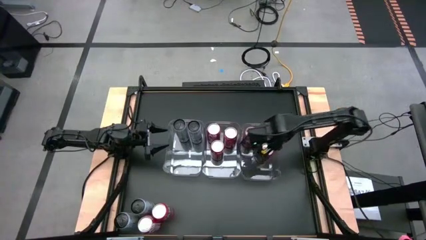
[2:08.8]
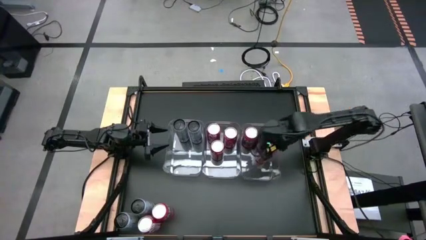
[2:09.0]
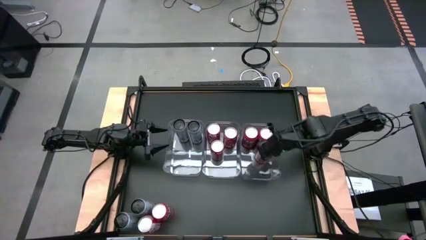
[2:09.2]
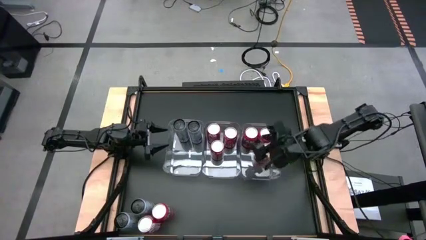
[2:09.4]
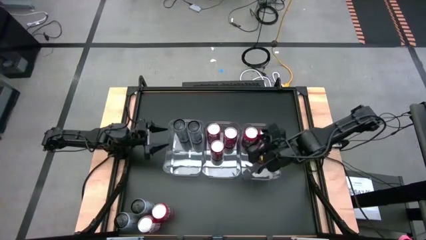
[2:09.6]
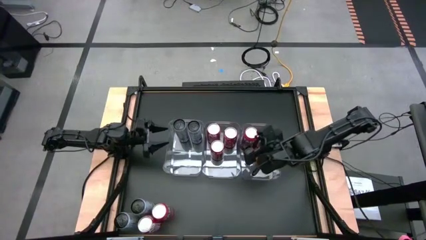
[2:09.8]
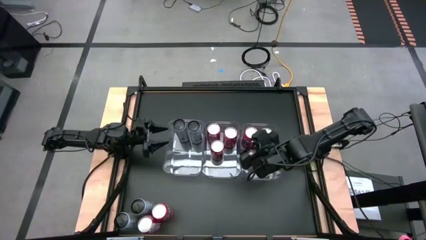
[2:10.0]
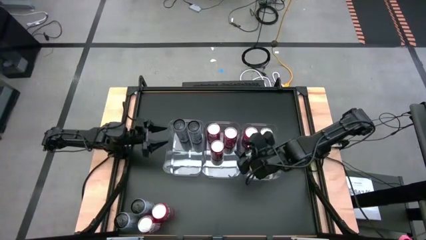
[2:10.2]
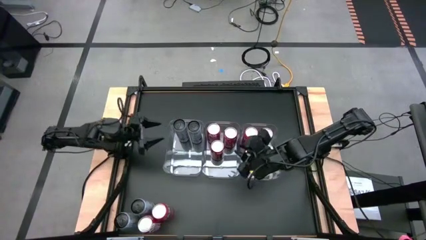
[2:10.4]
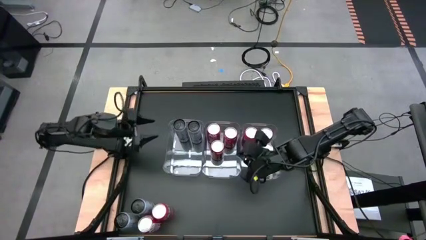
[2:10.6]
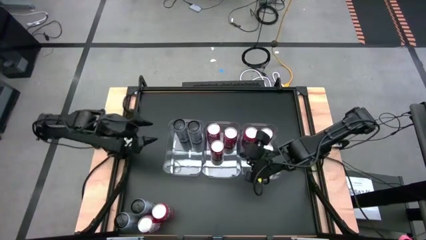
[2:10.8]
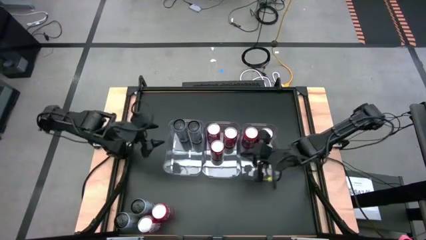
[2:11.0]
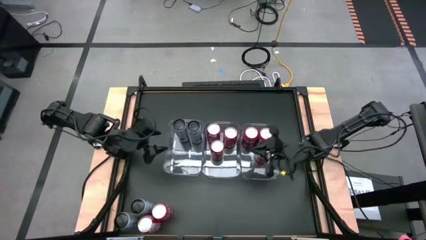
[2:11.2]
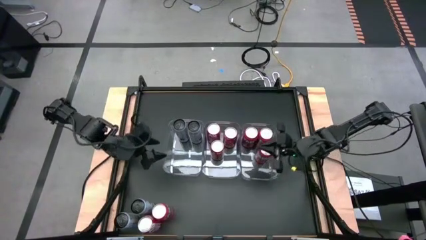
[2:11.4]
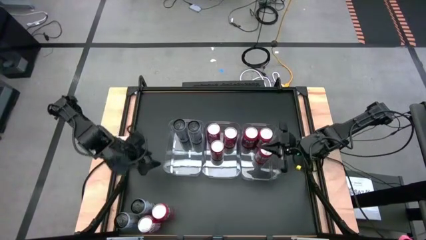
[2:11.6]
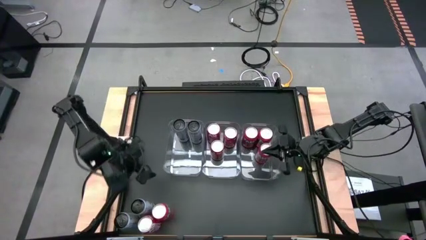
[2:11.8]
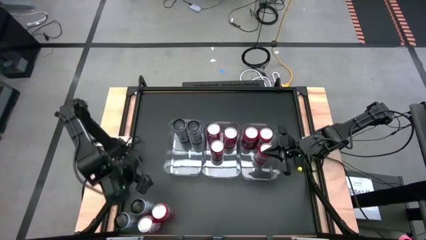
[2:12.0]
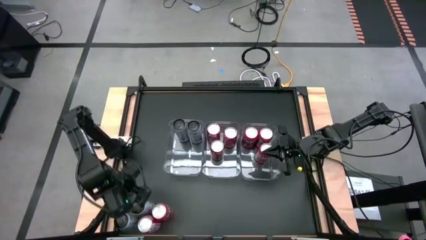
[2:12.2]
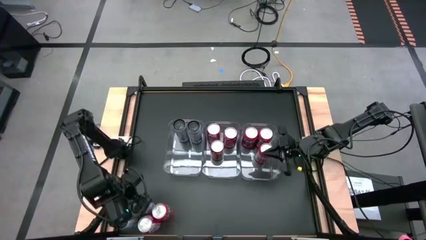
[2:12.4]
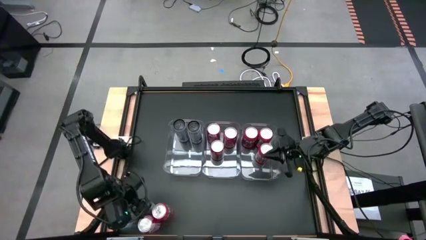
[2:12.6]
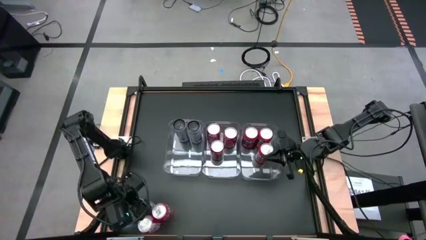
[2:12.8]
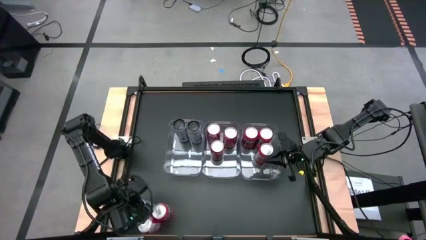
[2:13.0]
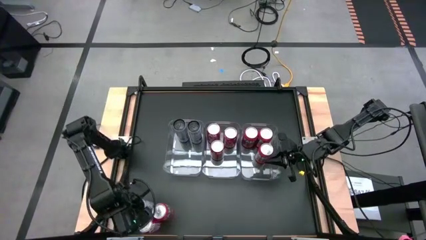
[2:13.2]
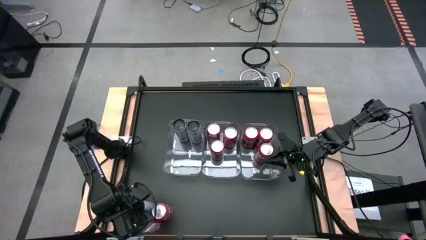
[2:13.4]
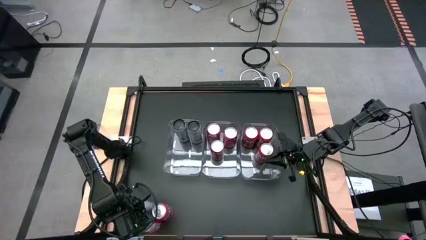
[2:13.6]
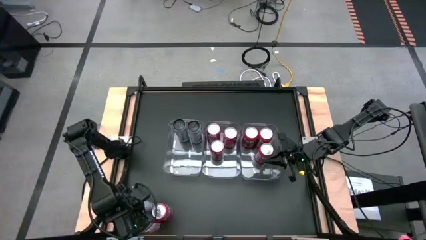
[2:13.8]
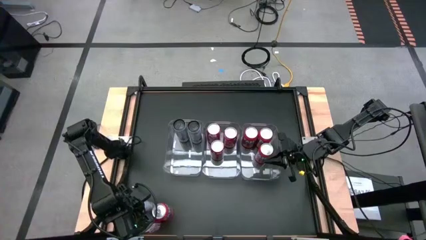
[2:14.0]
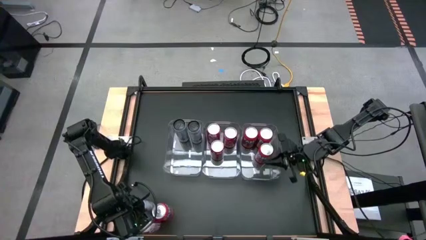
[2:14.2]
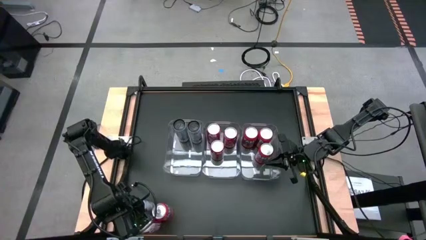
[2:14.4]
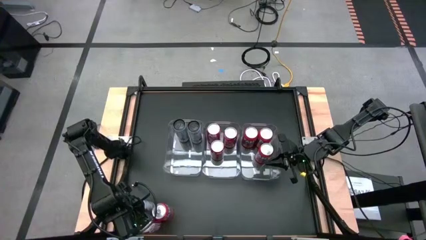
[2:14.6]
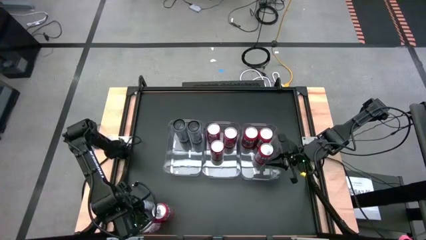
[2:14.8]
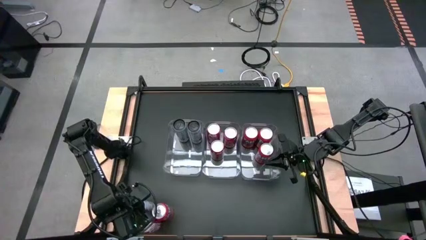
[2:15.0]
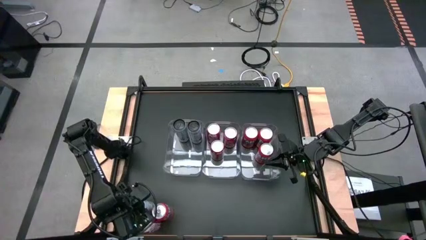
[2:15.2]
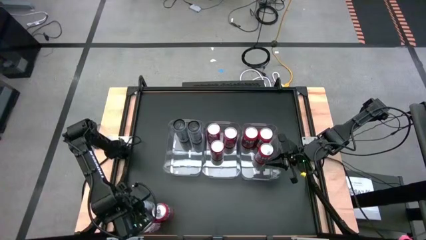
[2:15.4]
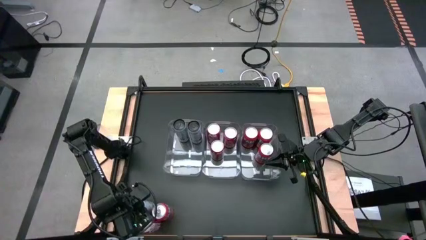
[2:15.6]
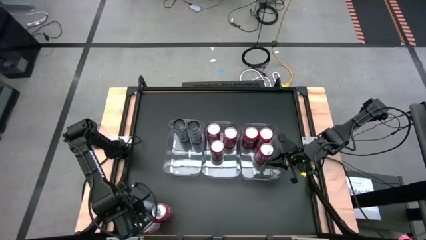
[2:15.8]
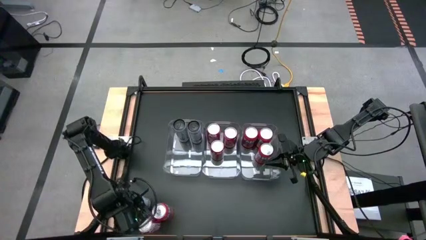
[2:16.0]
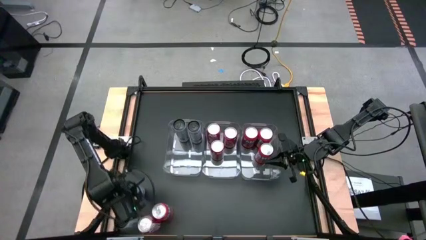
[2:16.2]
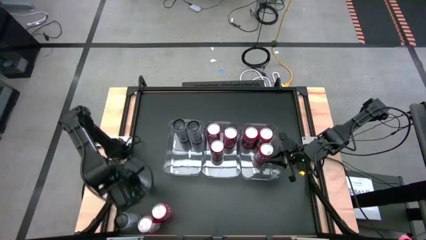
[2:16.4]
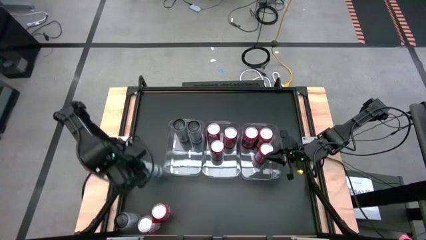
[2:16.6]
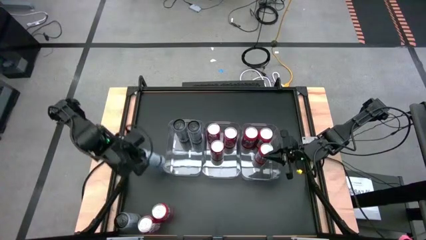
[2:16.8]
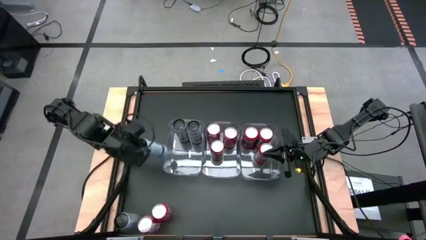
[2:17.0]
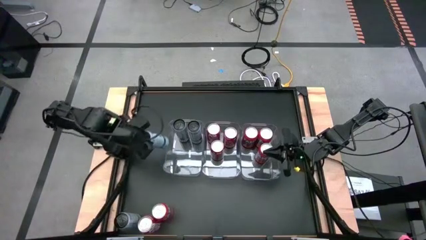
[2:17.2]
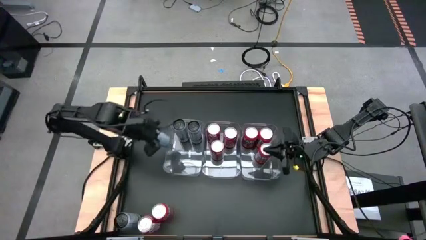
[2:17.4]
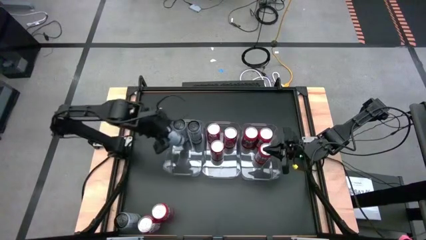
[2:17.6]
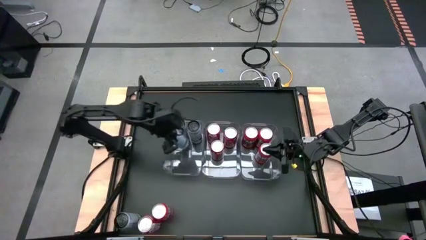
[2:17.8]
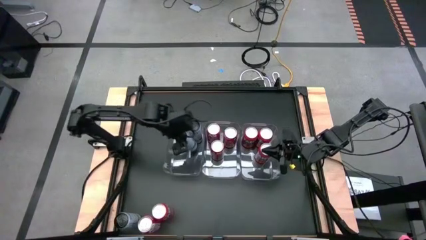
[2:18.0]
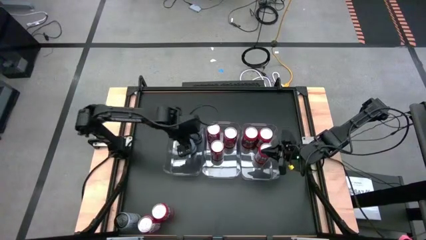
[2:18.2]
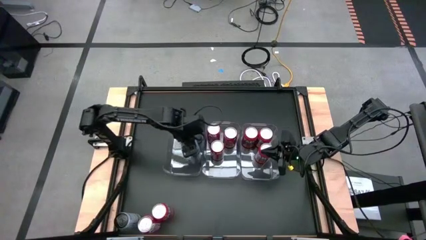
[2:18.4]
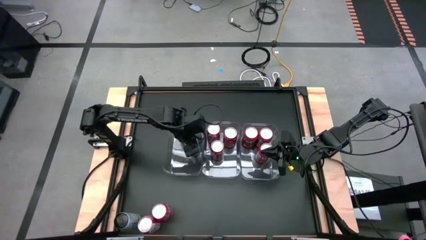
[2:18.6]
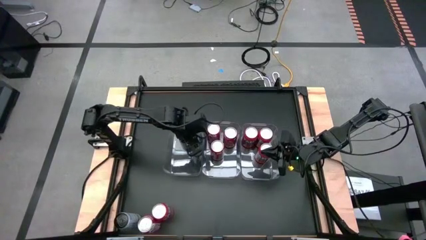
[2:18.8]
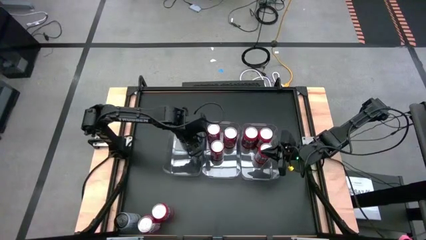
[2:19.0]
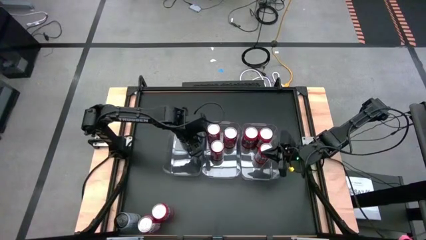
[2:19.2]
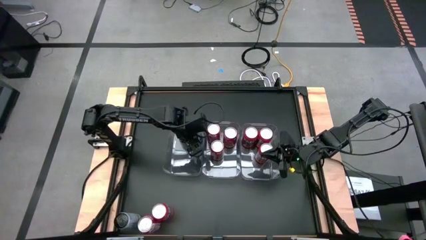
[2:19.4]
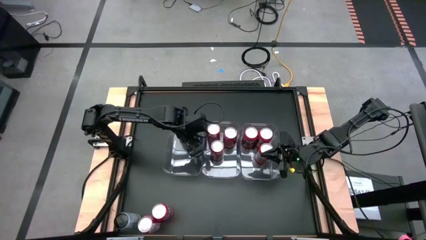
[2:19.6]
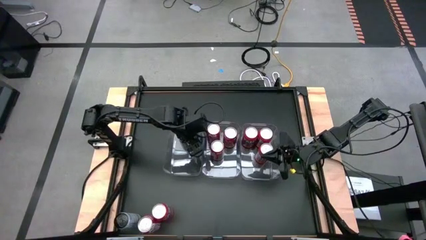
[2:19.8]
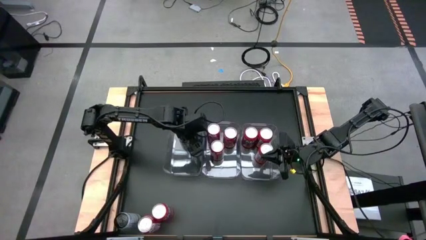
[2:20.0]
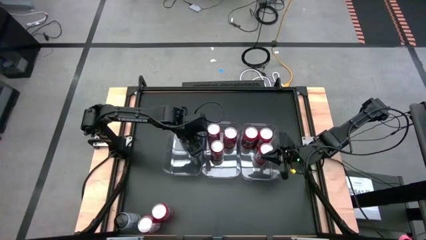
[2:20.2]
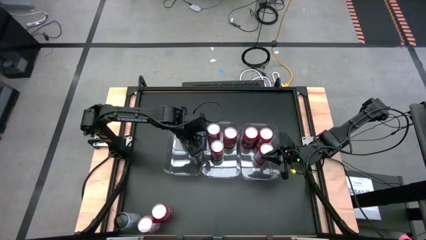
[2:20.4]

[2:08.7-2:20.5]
Task: Sort soda cans
Put the white-blue soda can into the left transparent bin
